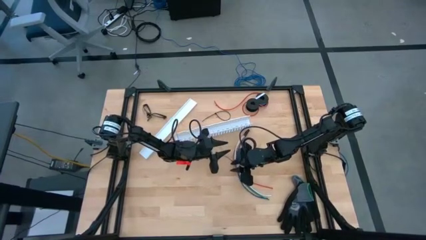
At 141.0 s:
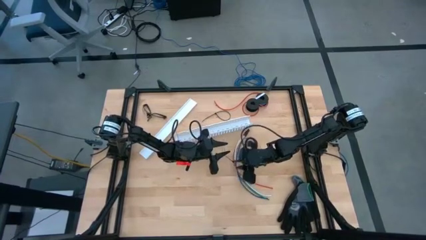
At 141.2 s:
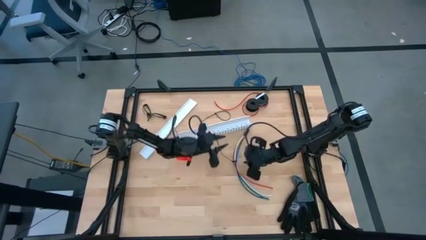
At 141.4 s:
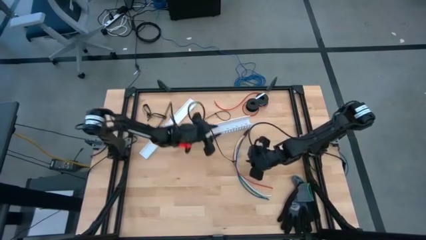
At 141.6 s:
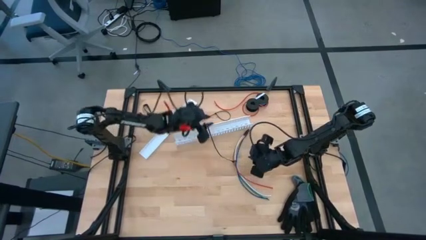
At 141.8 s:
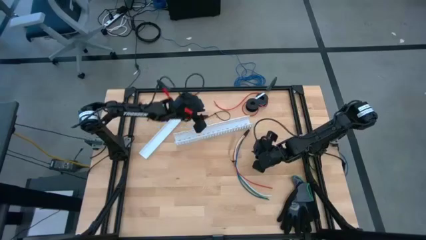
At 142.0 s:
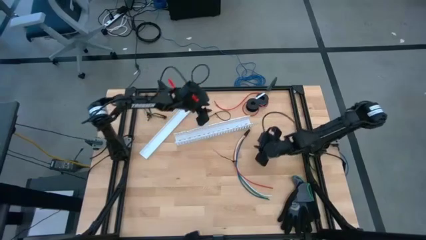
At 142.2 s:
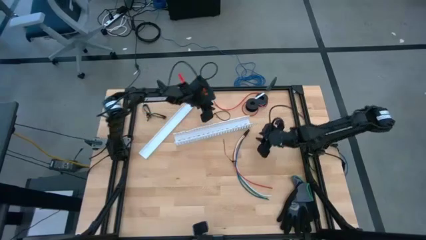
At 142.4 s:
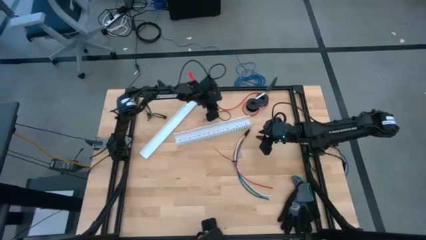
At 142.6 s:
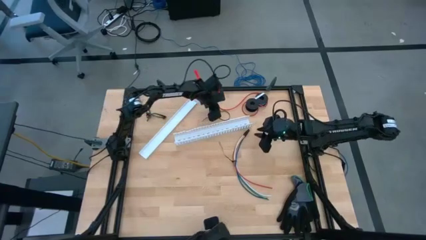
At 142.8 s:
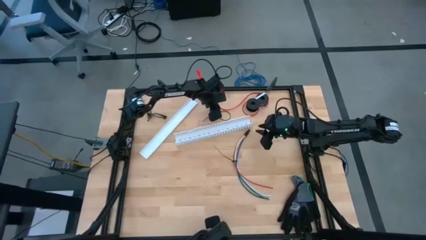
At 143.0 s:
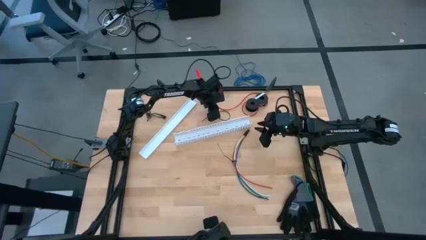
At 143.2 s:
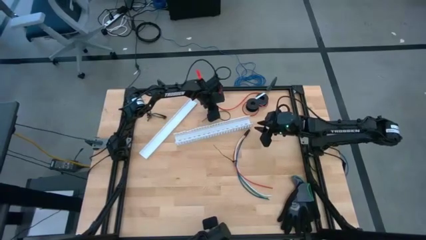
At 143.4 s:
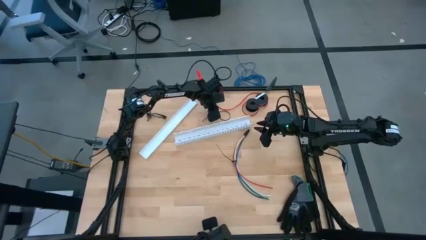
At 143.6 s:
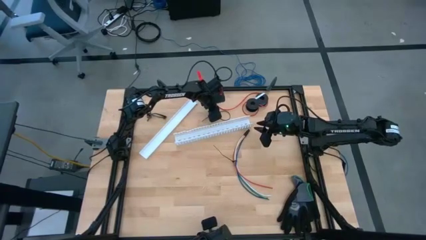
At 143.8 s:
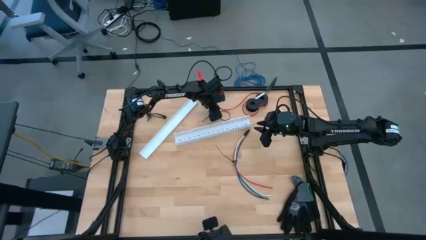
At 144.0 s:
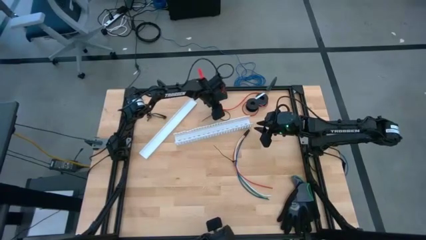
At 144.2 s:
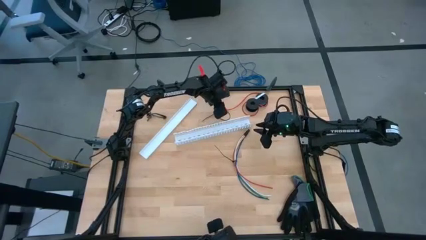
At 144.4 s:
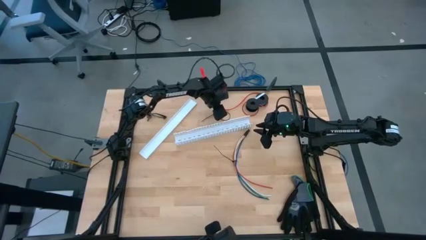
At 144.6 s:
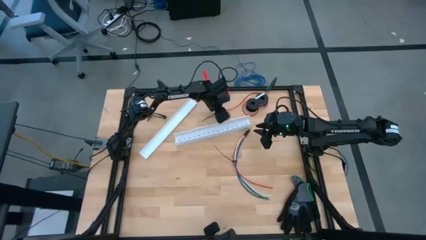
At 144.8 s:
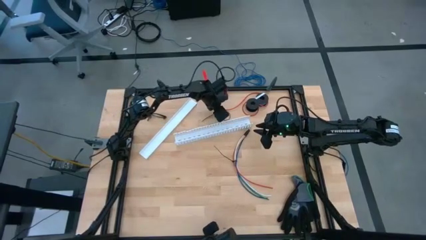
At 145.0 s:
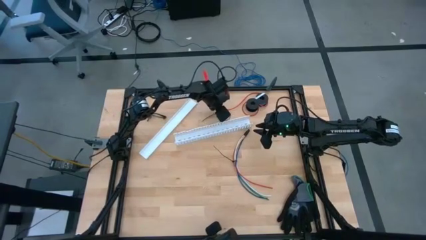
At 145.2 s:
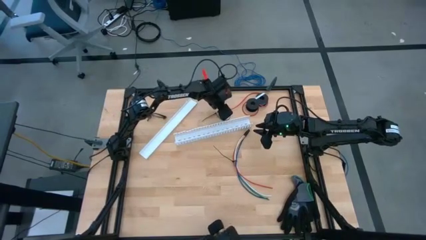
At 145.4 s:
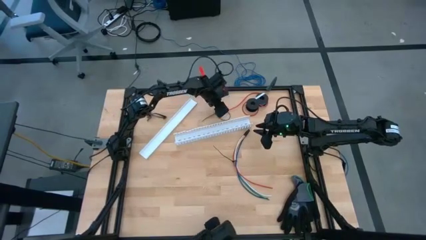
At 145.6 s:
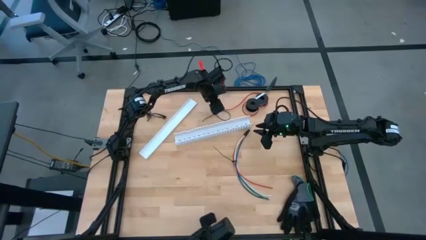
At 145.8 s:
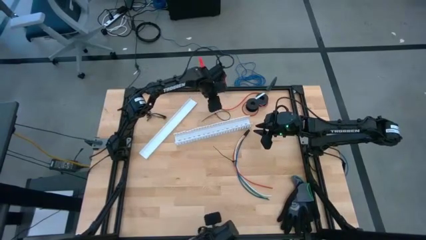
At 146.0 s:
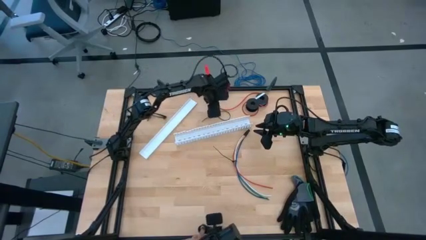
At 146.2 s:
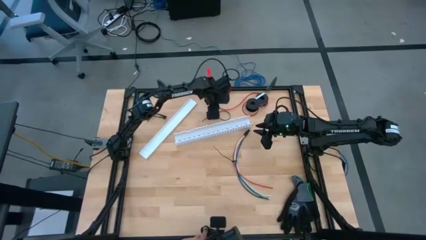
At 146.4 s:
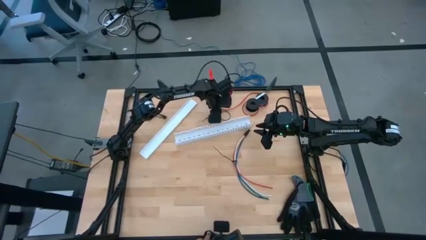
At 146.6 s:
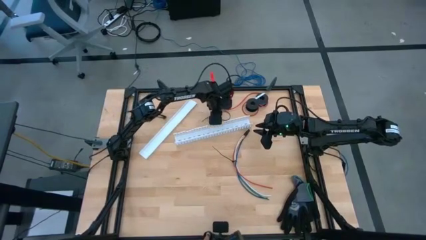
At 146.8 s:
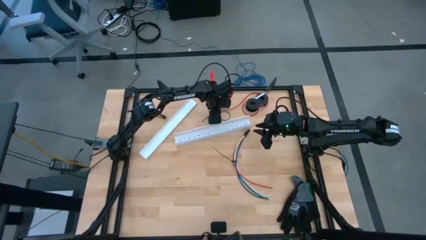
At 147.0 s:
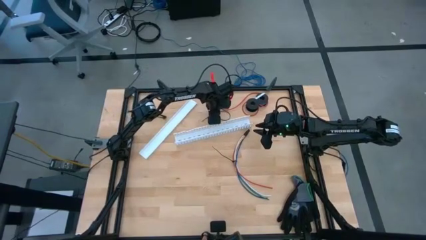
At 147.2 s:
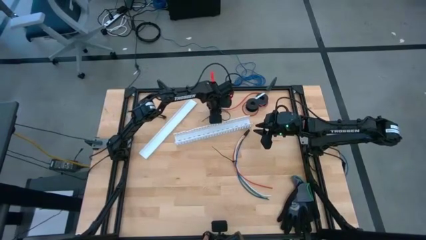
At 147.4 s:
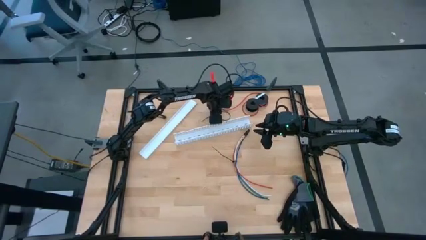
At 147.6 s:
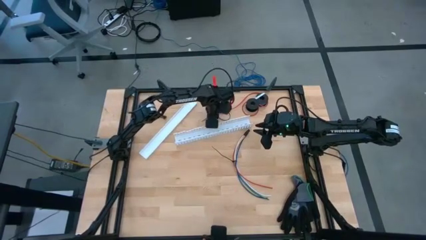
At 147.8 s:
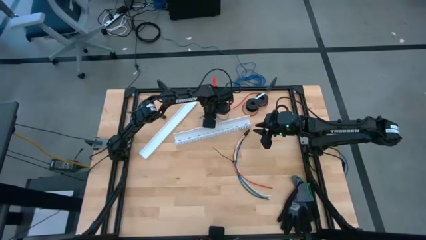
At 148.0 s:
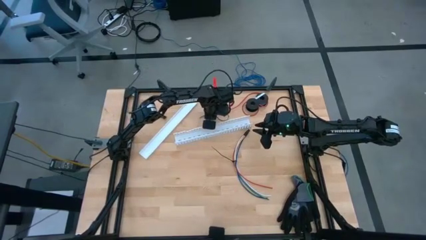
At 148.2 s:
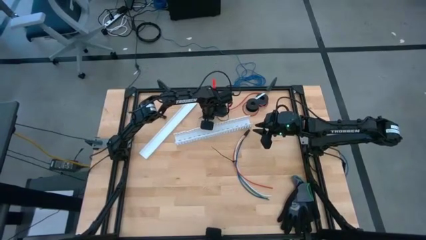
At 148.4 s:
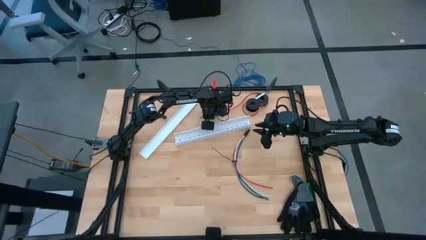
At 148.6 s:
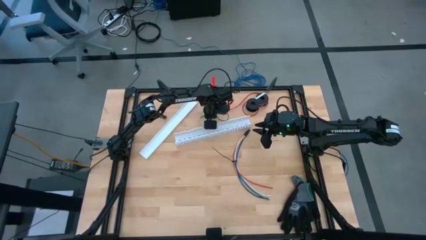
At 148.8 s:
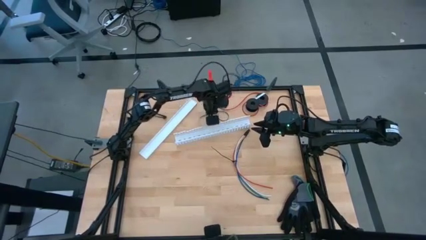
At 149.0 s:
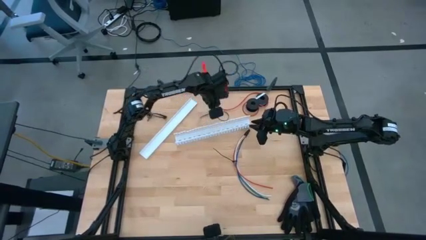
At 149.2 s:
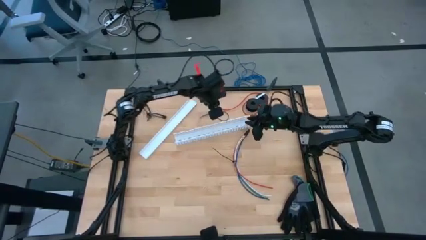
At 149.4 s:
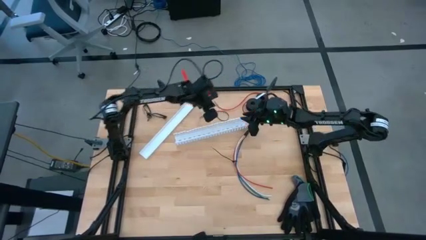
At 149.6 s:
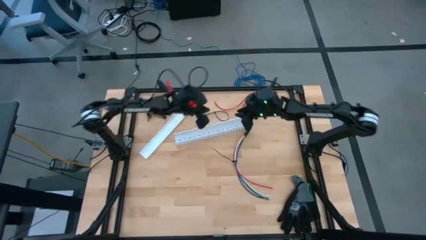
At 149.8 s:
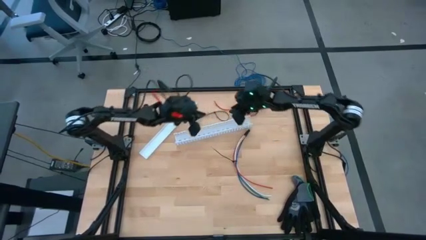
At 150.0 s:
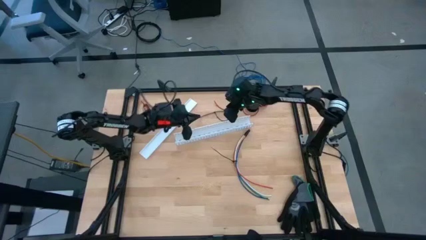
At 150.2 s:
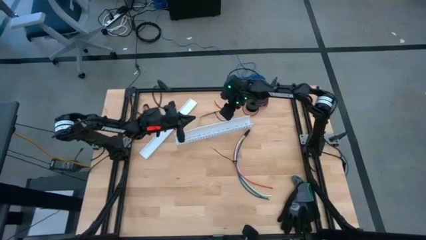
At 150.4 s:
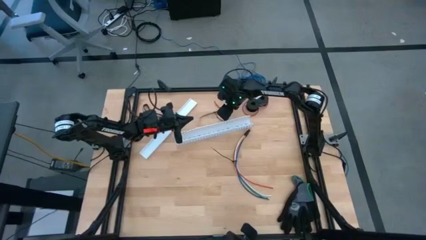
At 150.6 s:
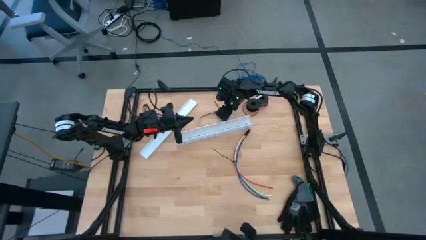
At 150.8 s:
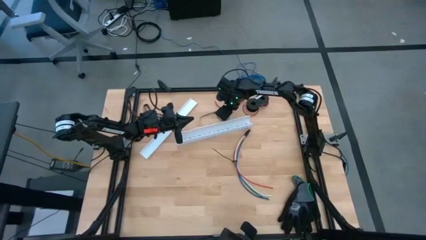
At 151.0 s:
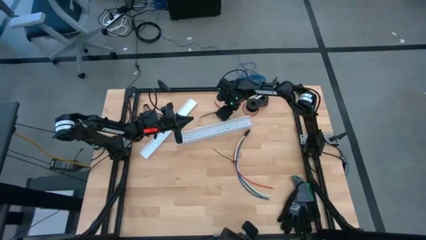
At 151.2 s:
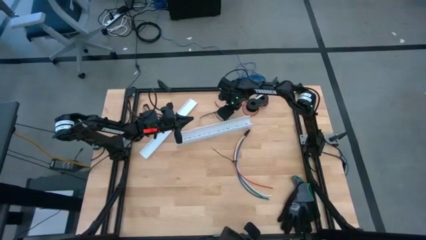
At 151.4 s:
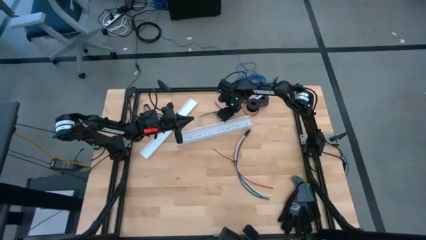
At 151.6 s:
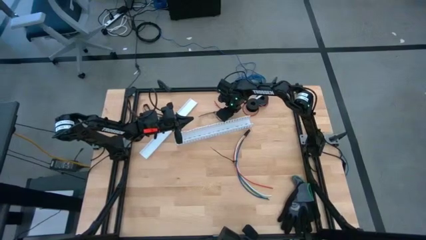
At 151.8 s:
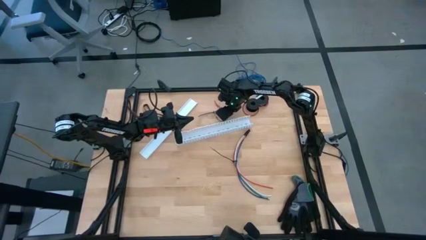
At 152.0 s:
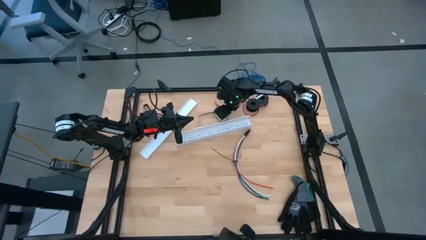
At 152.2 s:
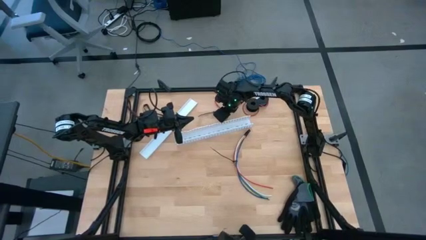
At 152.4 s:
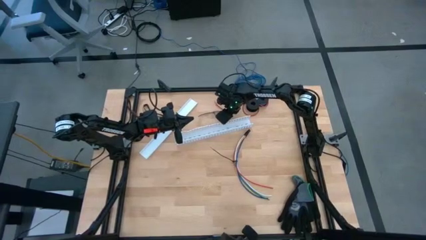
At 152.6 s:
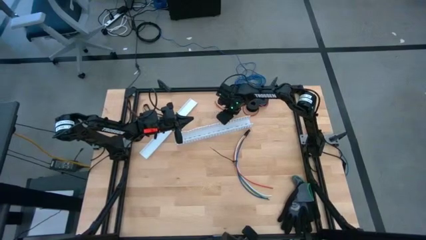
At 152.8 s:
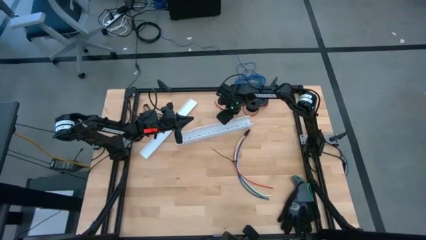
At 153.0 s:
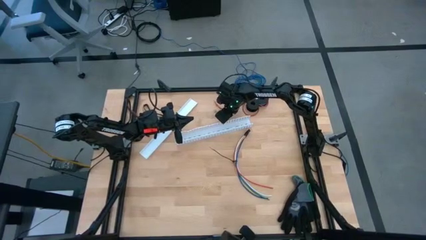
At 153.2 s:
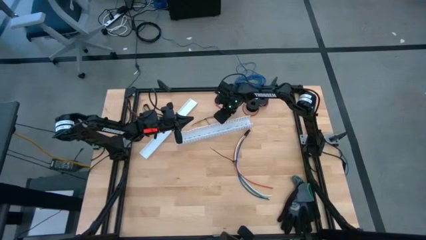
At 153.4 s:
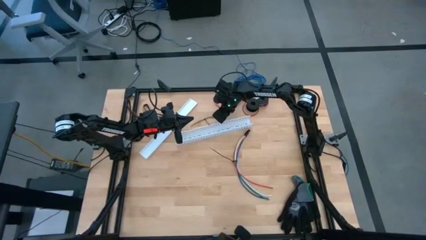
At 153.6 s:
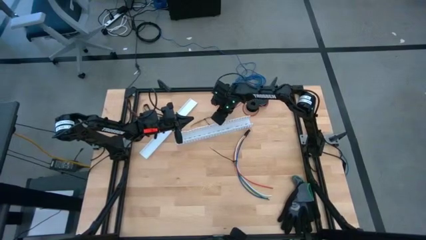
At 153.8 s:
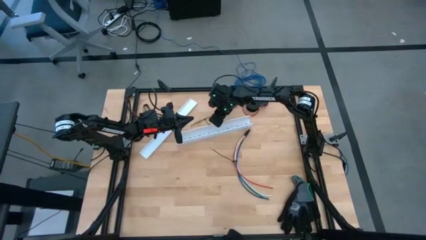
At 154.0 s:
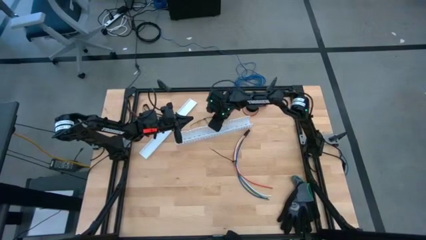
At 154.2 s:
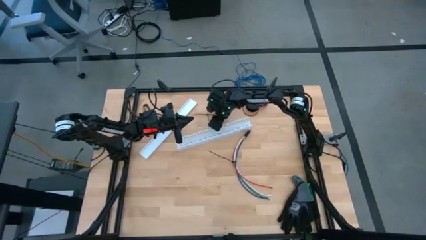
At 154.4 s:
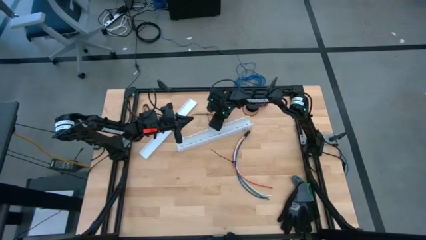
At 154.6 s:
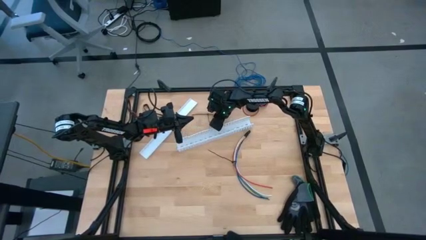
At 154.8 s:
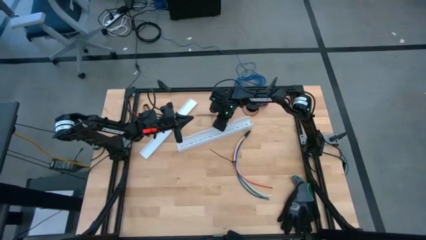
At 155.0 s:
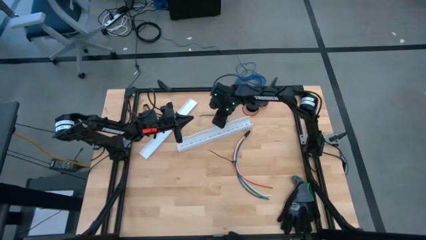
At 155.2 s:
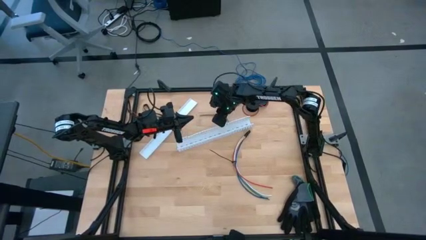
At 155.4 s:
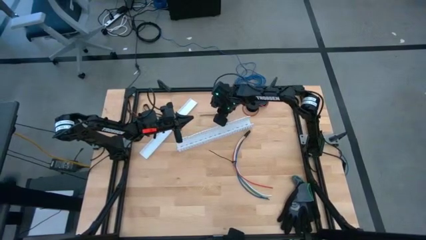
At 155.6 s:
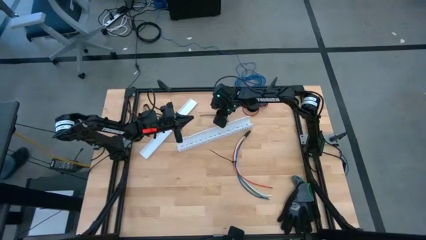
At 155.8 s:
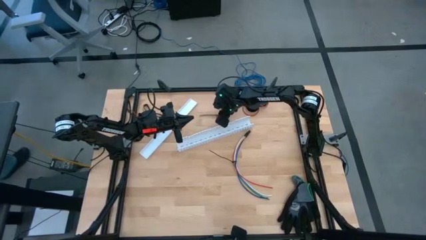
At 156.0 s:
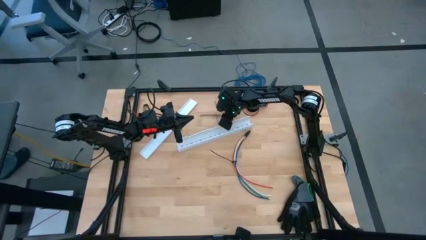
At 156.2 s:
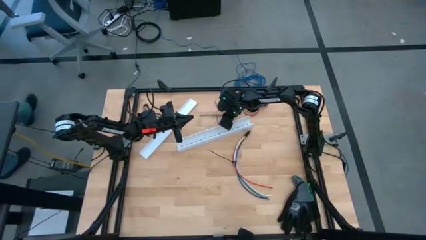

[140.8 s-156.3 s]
Task: Ziptie cables
Wrap the cables together using the black zip tie
